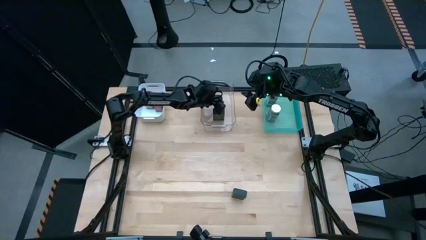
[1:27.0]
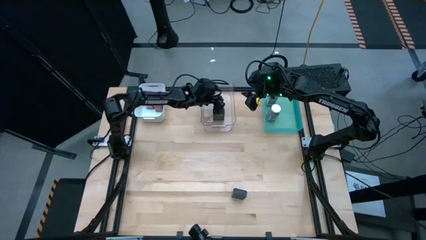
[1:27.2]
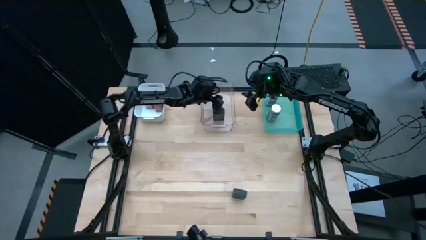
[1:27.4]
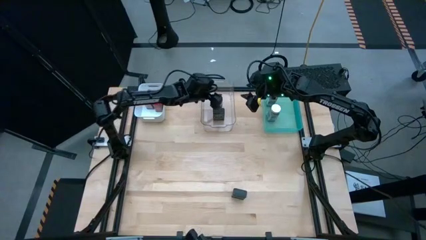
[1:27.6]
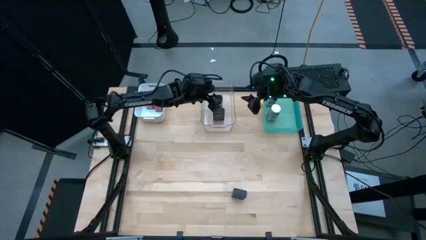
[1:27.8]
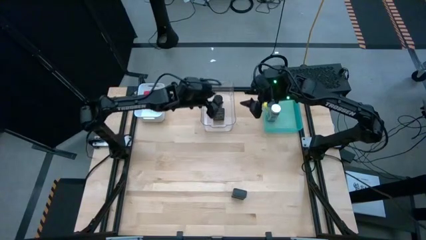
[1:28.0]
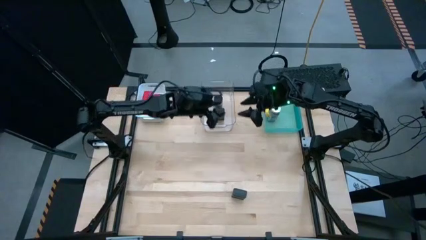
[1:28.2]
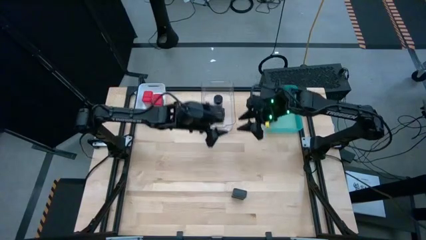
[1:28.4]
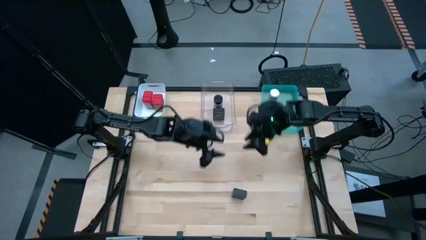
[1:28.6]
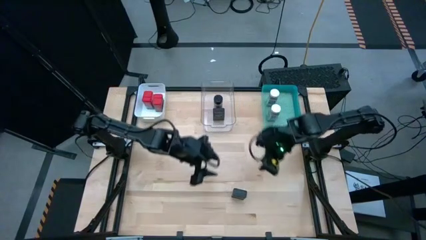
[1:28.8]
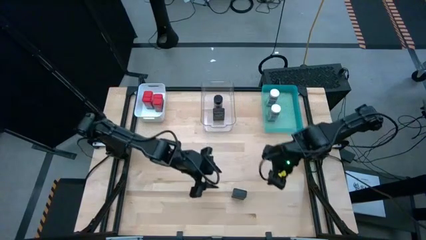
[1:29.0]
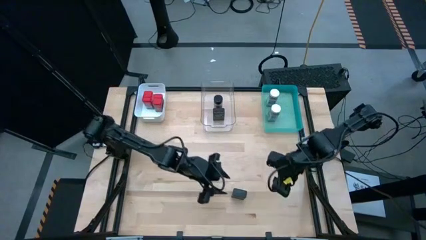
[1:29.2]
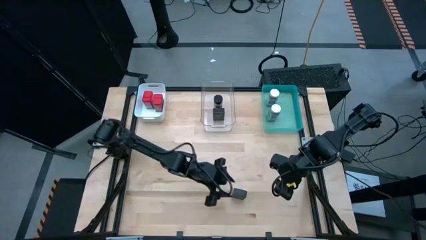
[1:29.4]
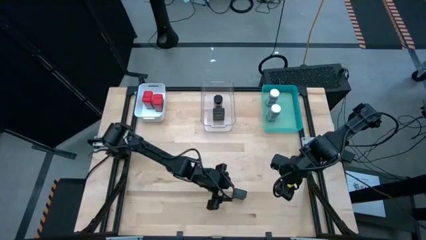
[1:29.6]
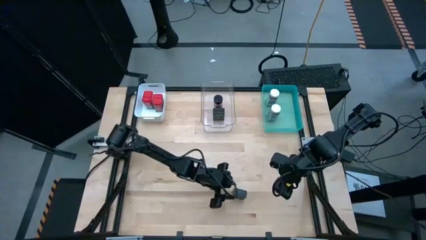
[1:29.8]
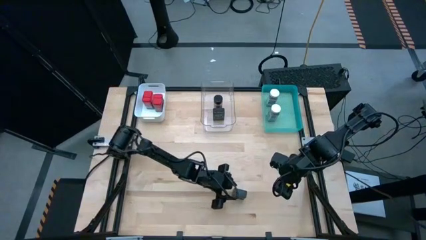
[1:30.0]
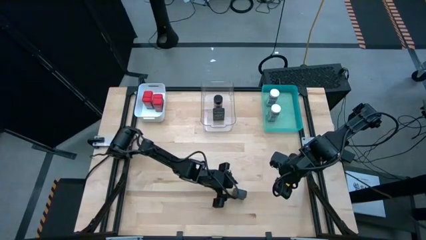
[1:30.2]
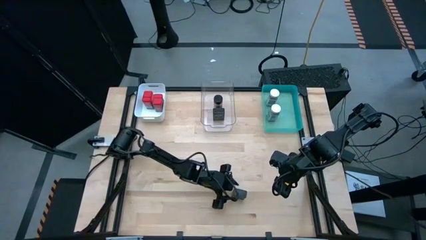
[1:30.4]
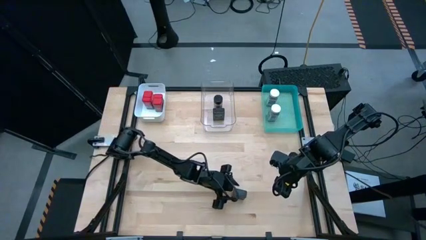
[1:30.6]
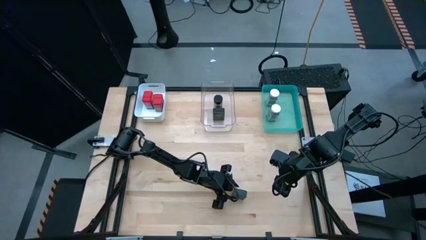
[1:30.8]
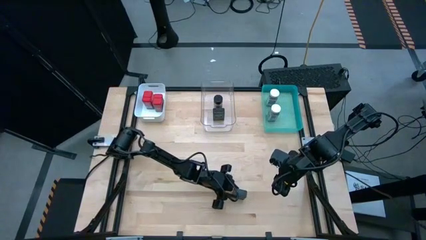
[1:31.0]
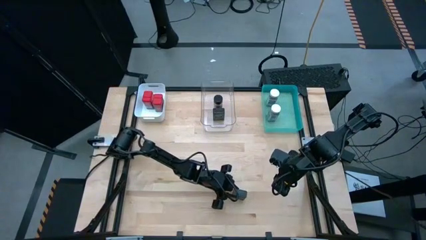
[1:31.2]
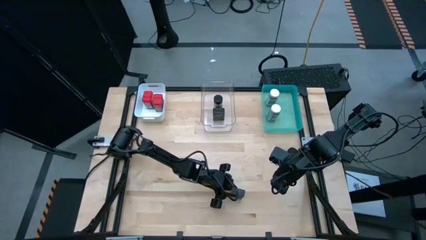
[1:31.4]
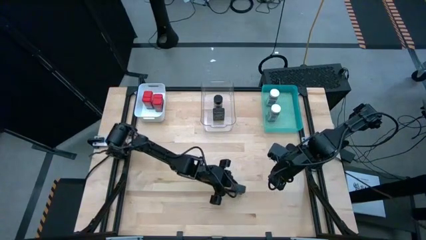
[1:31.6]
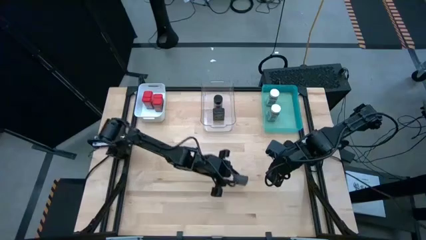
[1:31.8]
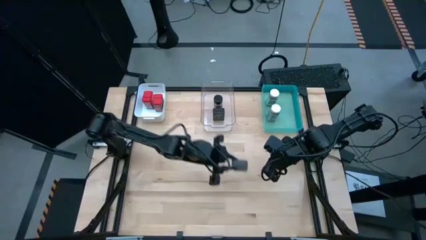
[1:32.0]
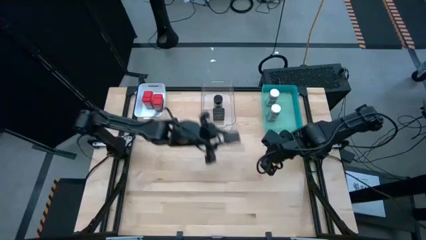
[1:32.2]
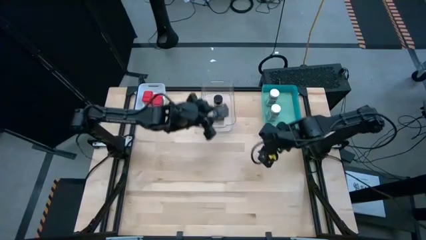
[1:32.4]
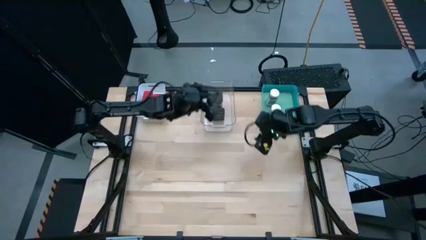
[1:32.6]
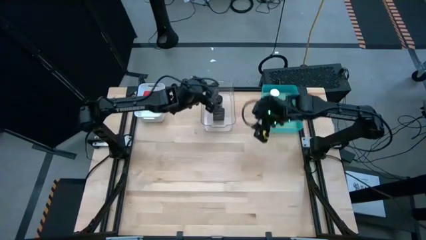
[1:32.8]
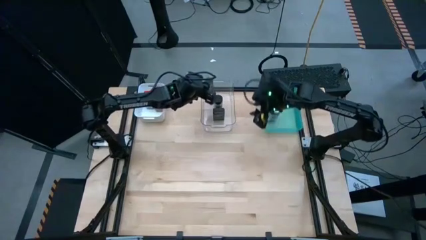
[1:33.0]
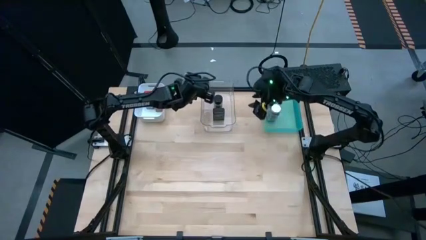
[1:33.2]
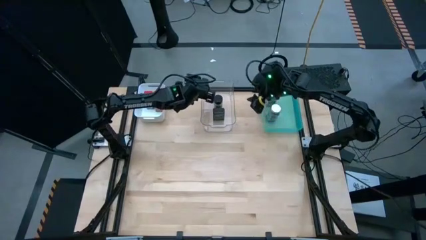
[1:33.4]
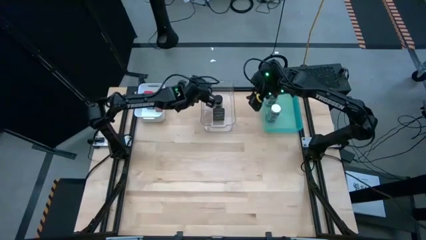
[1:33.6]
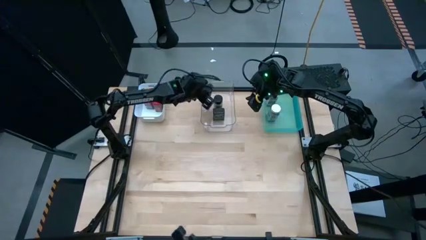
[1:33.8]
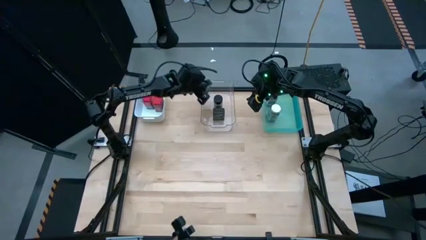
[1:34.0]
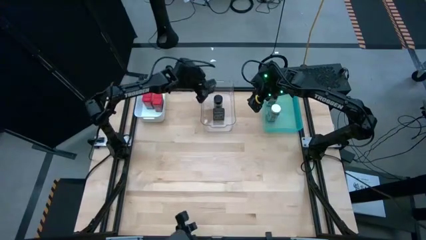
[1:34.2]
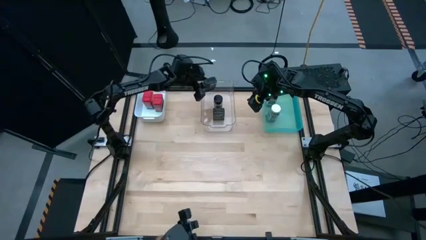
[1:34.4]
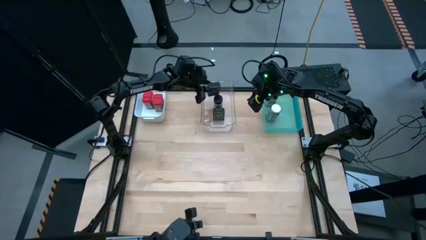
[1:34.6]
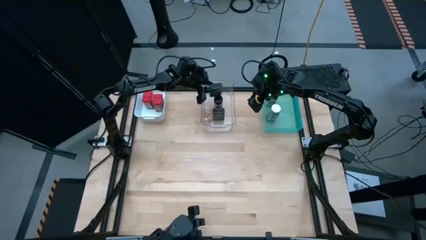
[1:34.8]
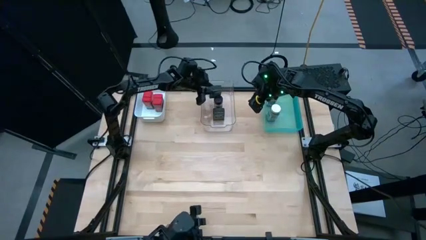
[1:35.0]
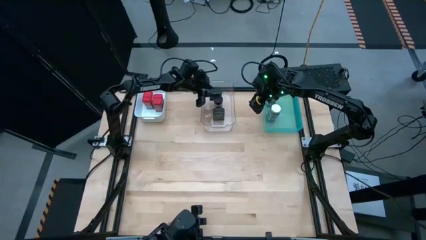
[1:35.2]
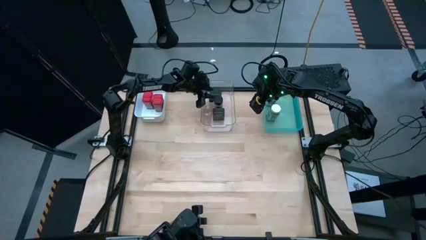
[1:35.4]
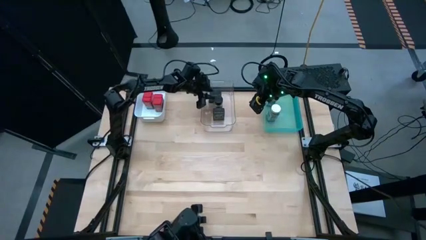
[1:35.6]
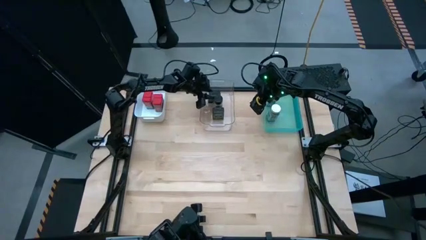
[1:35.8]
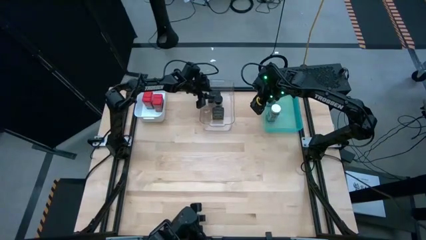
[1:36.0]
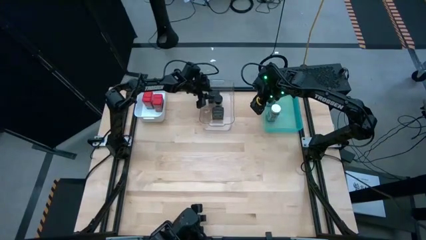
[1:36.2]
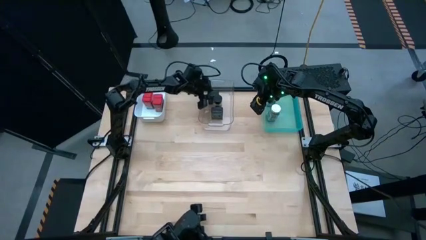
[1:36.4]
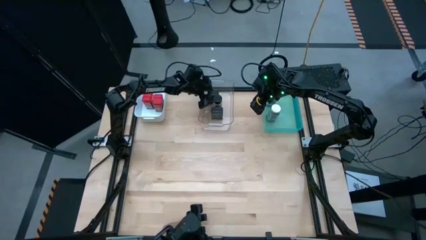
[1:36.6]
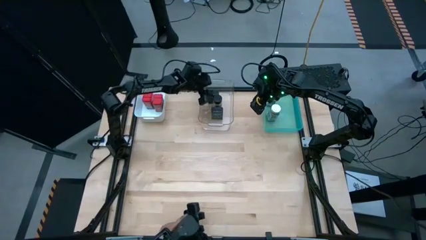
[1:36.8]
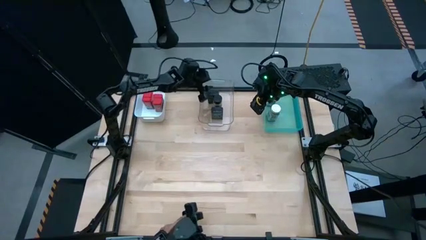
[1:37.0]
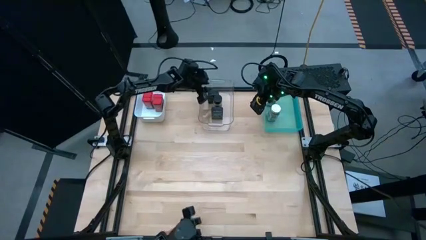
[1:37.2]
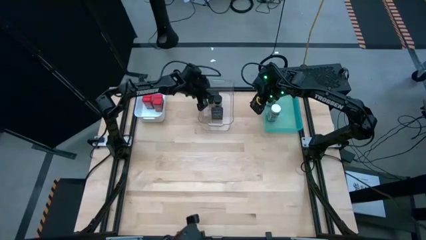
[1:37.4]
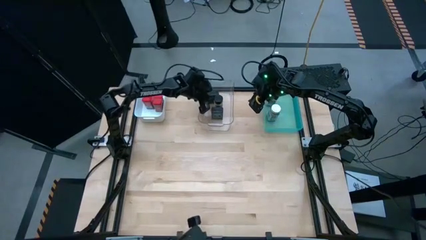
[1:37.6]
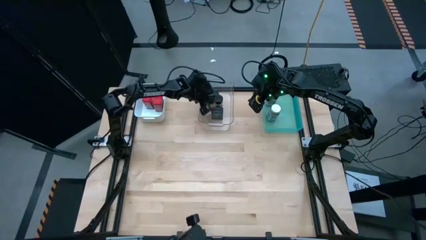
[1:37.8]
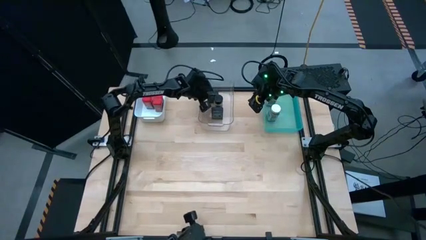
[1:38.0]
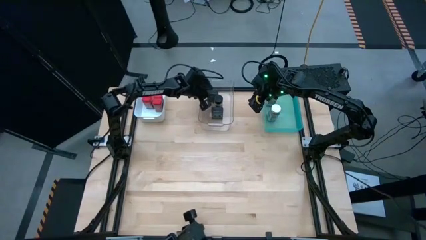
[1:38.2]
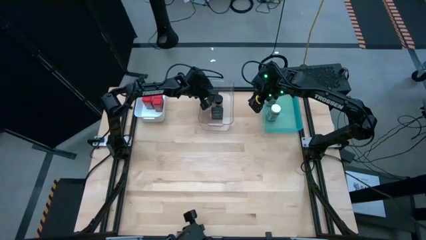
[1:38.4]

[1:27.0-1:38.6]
Task: Sort spices by type
Put the black seasoning can into the transparent bin

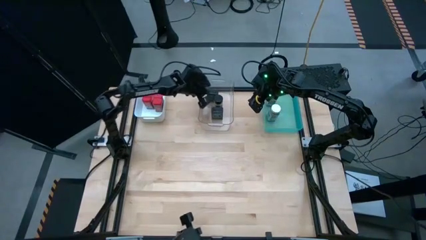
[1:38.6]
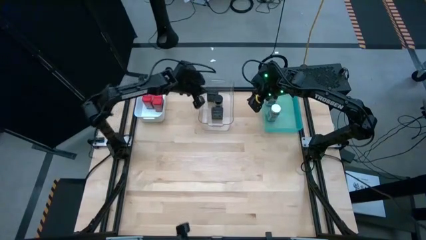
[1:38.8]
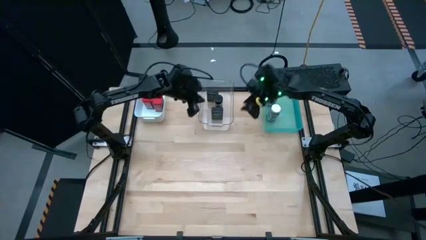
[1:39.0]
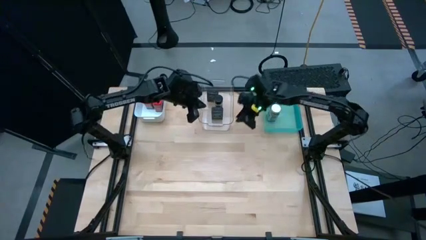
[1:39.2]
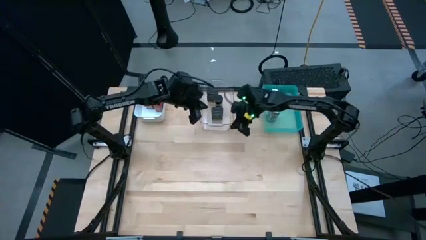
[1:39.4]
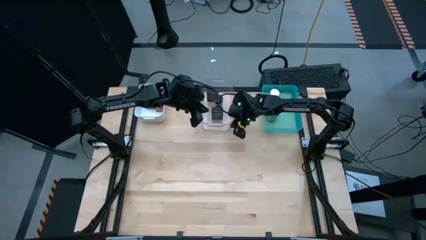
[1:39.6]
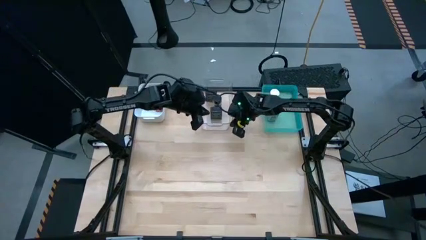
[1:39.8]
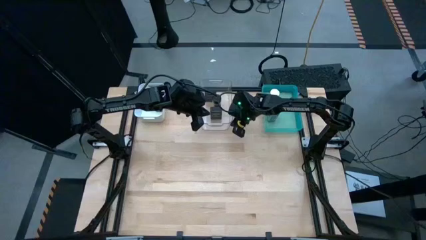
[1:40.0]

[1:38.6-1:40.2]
Adjust the transparent bin

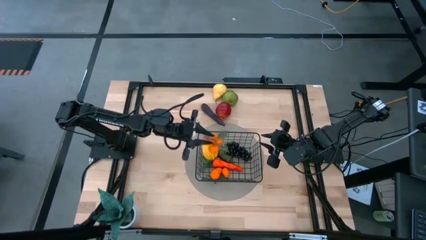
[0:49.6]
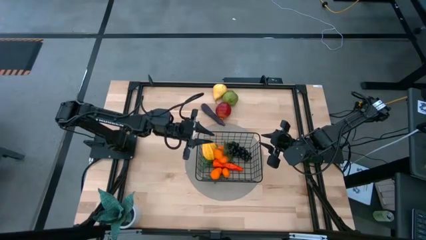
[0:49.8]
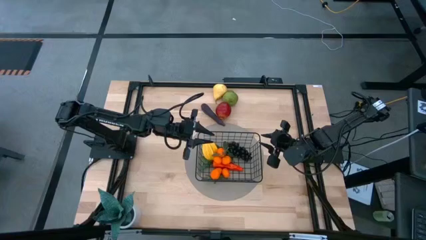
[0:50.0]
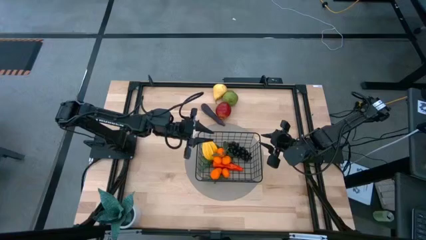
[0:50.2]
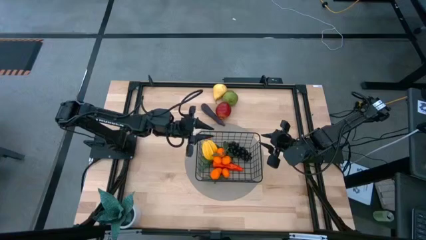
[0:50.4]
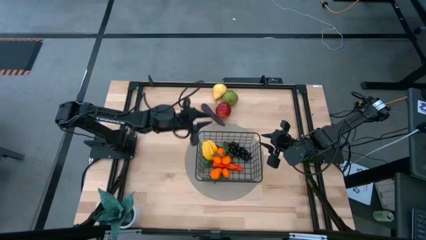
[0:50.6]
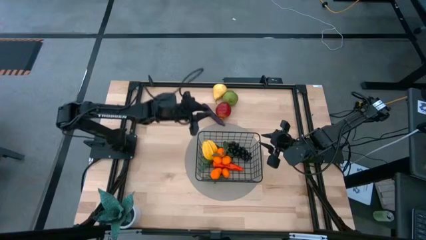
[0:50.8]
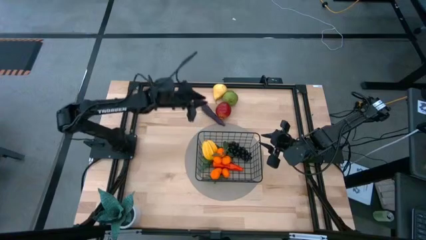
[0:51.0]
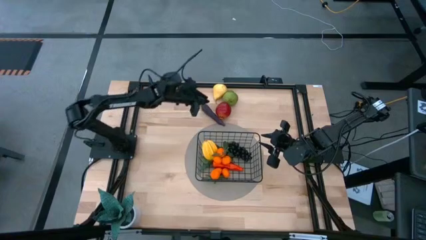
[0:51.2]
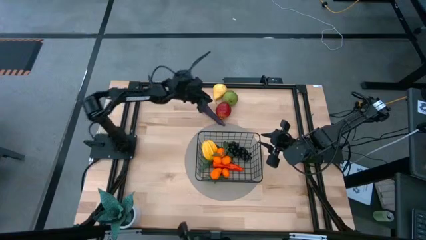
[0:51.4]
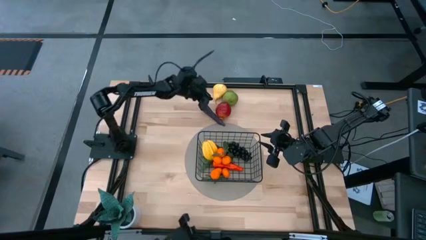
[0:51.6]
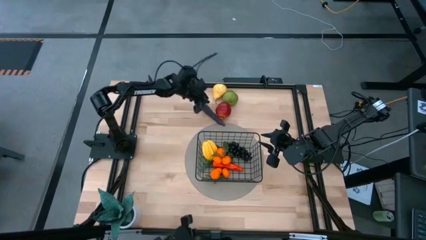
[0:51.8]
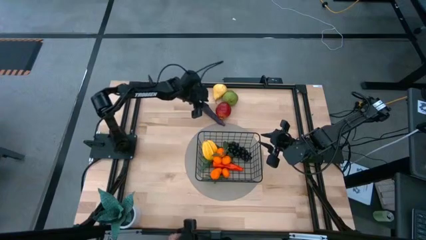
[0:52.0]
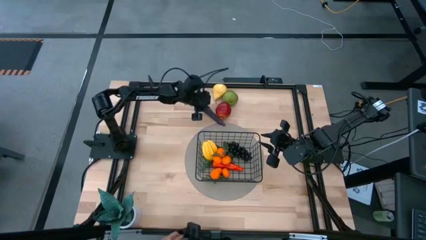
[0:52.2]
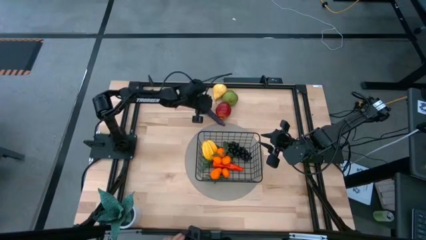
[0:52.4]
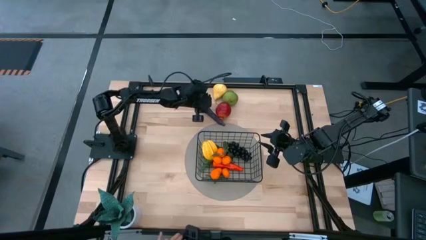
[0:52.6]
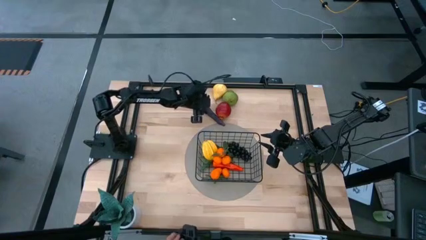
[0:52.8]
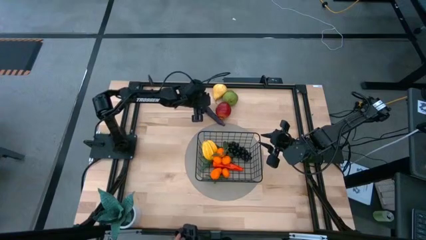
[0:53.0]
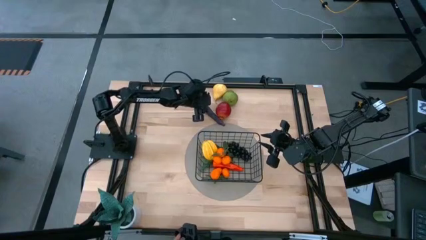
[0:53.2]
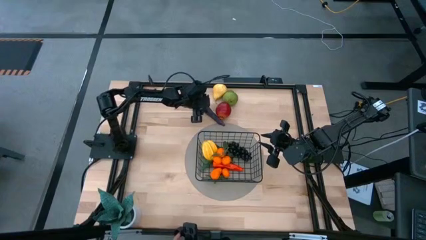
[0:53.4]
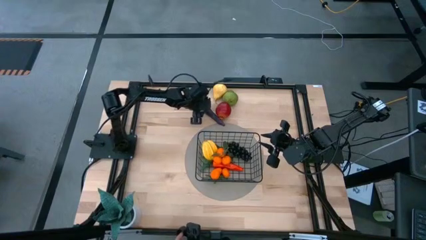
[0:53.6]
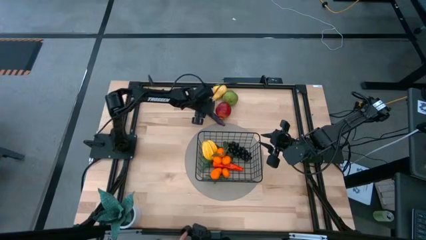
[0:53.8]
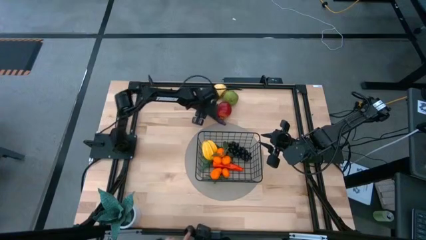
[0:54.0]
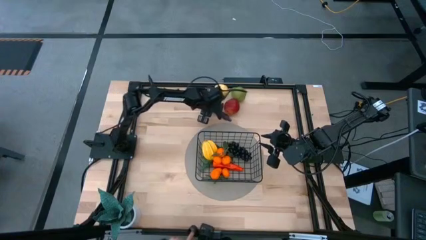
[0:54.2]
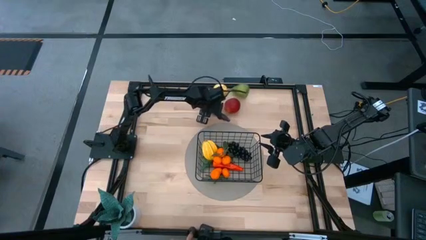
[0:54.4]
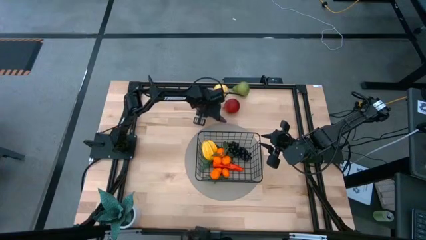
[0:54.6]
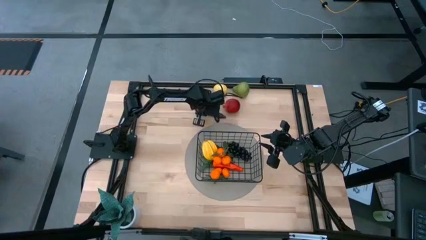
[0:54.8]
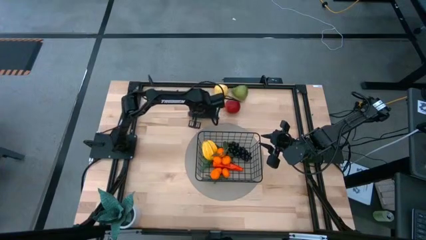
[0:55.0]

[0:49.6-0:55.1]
Task: Build produce basket
Put the eggplant into the wire basket
